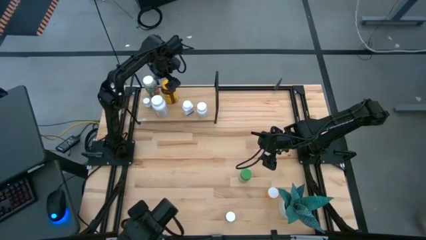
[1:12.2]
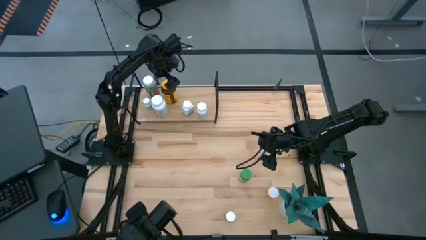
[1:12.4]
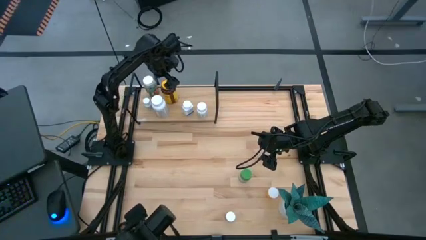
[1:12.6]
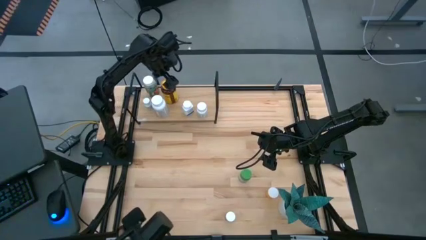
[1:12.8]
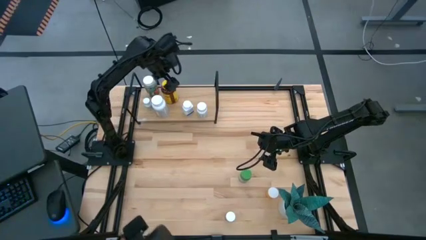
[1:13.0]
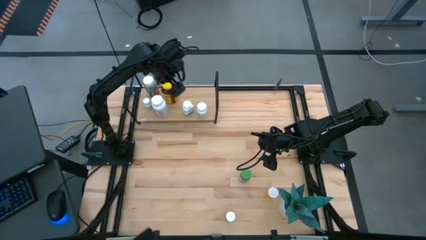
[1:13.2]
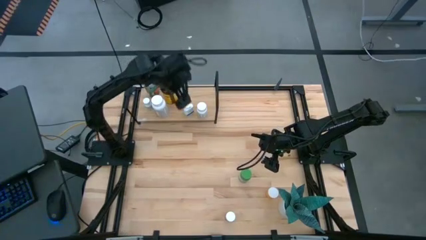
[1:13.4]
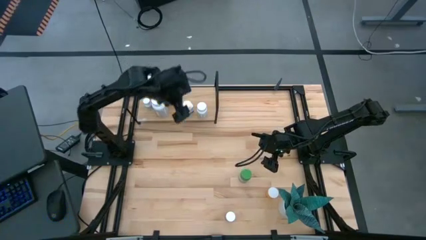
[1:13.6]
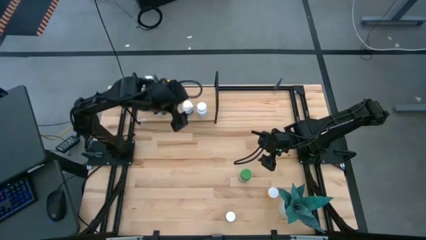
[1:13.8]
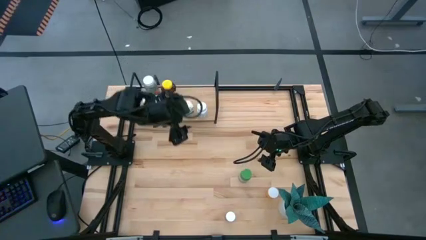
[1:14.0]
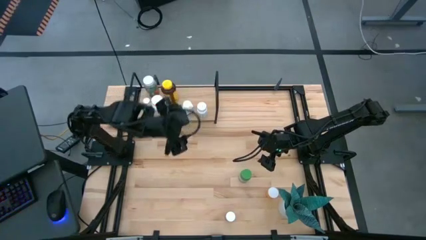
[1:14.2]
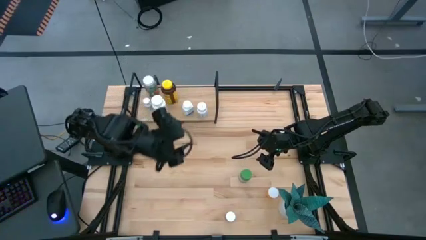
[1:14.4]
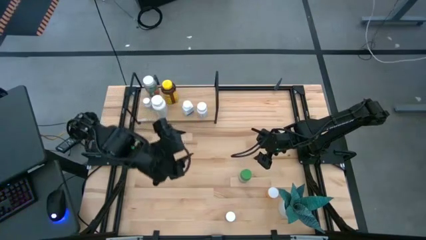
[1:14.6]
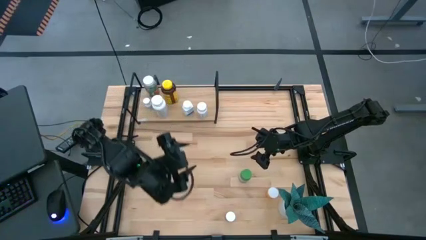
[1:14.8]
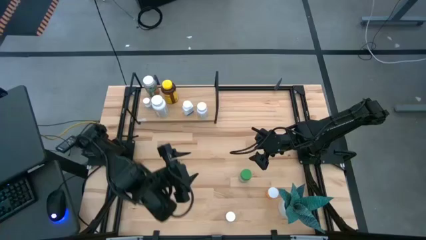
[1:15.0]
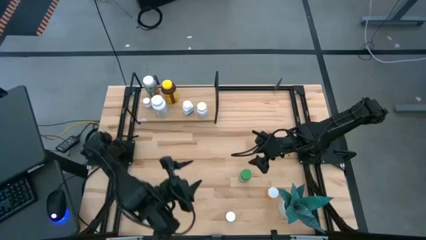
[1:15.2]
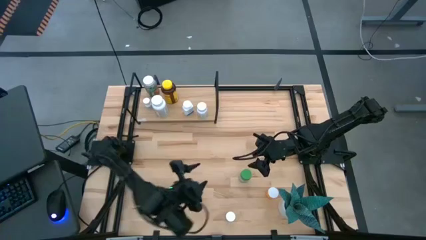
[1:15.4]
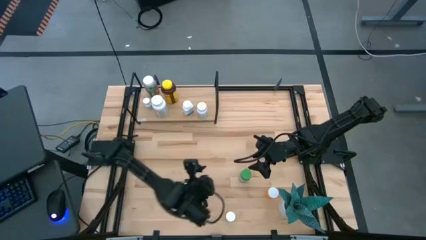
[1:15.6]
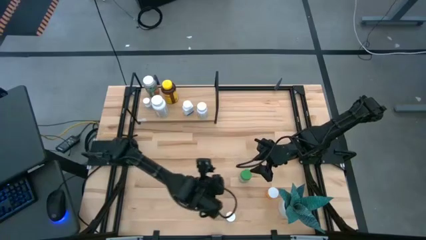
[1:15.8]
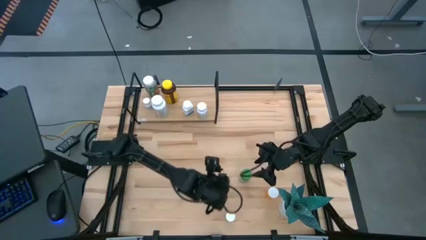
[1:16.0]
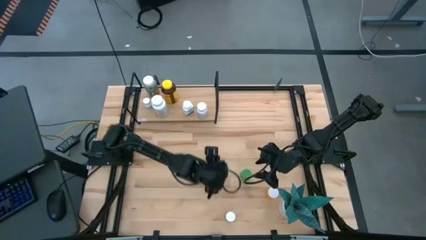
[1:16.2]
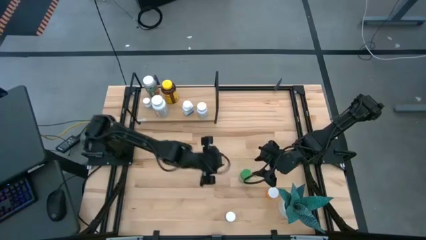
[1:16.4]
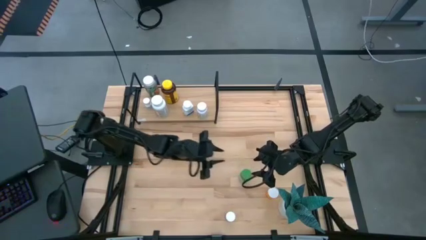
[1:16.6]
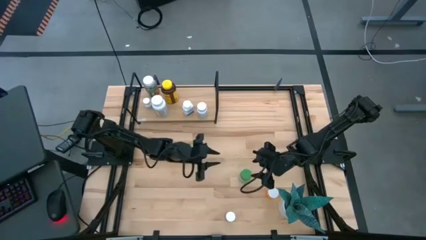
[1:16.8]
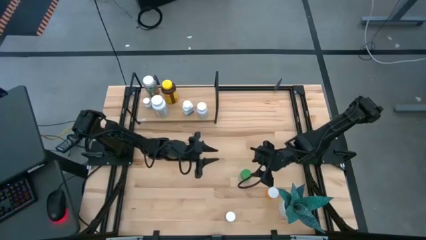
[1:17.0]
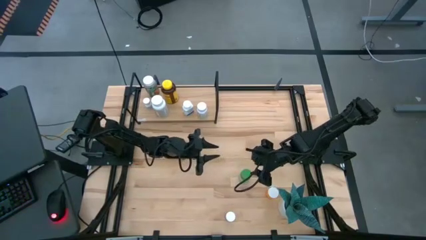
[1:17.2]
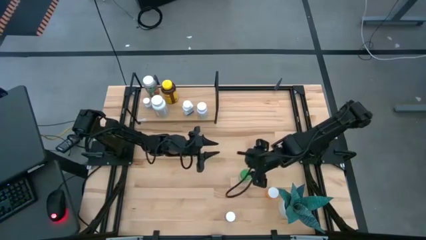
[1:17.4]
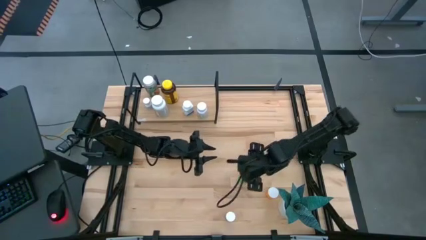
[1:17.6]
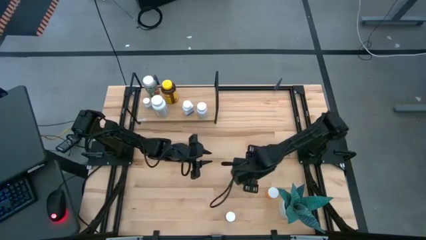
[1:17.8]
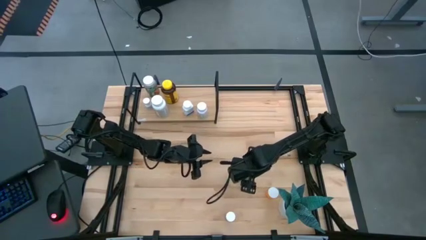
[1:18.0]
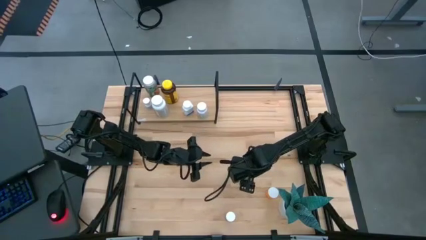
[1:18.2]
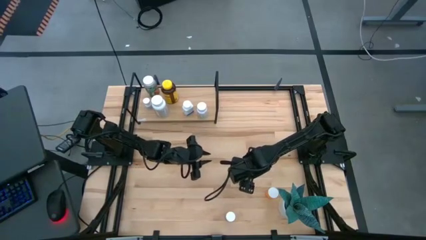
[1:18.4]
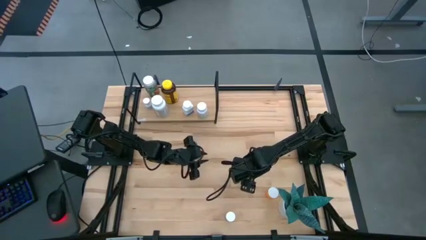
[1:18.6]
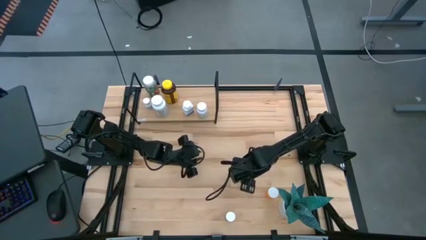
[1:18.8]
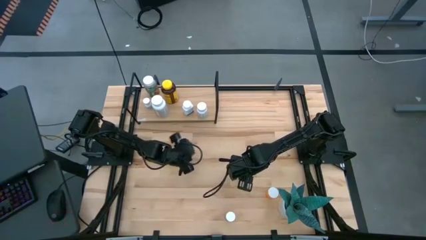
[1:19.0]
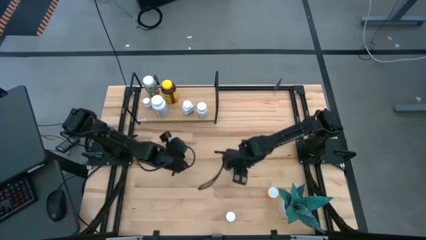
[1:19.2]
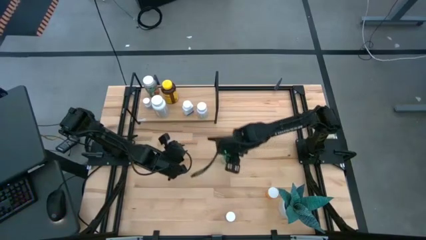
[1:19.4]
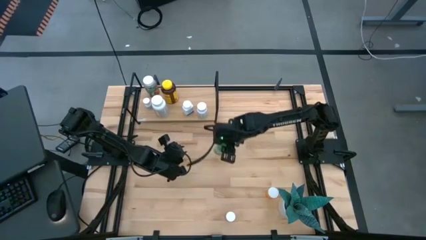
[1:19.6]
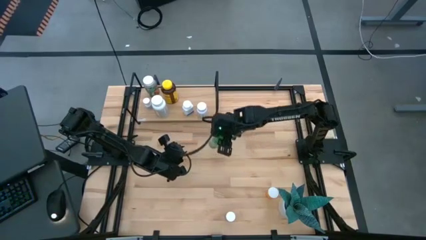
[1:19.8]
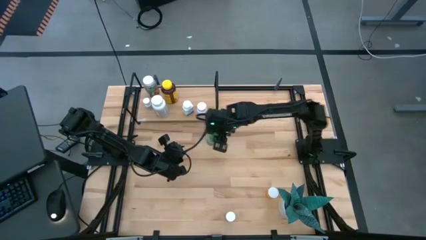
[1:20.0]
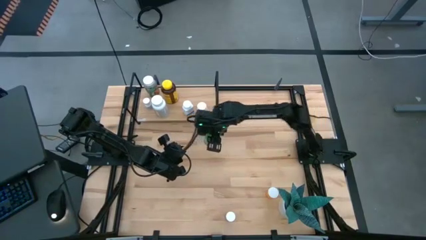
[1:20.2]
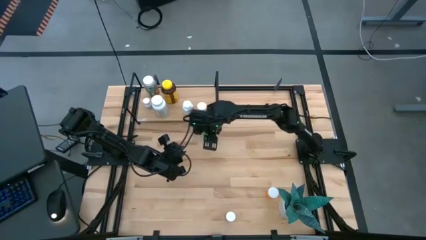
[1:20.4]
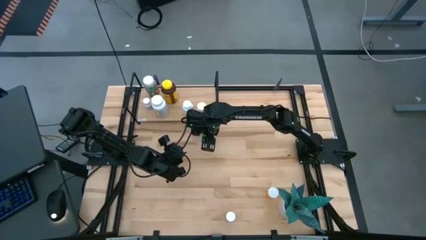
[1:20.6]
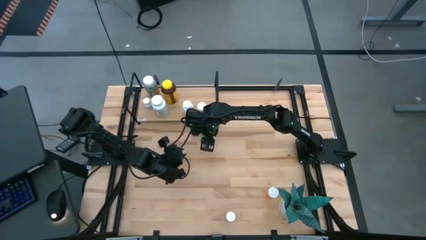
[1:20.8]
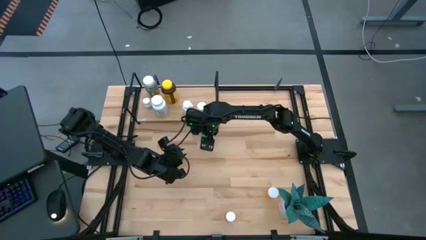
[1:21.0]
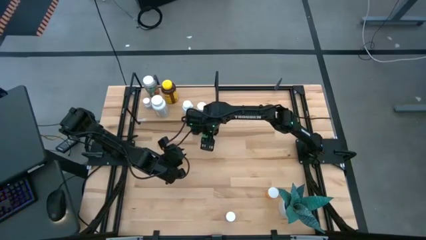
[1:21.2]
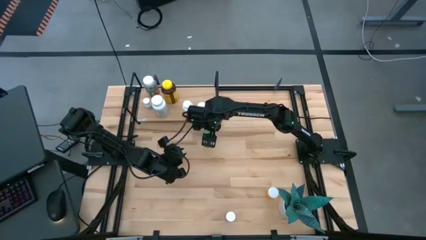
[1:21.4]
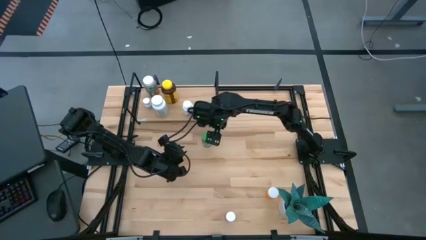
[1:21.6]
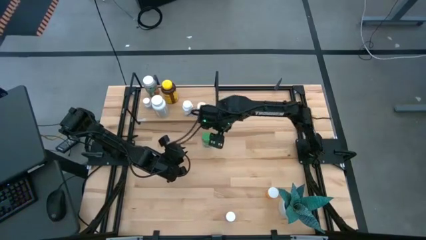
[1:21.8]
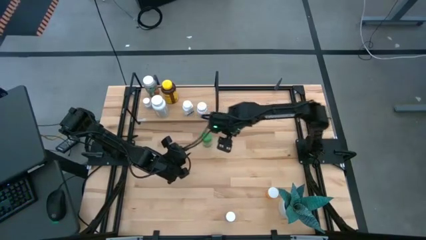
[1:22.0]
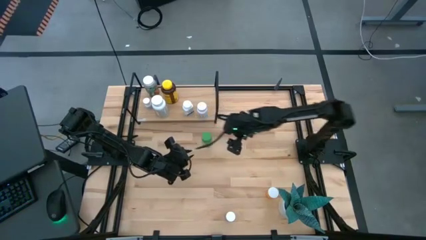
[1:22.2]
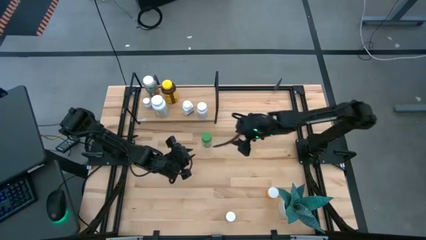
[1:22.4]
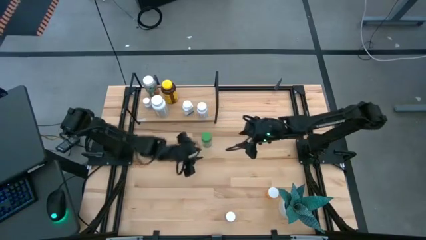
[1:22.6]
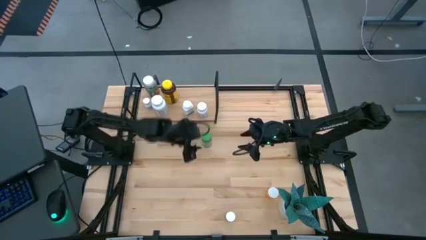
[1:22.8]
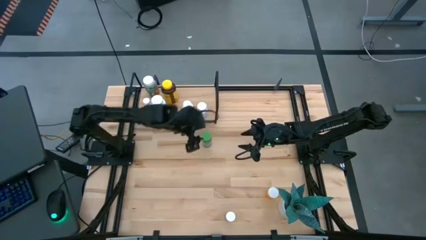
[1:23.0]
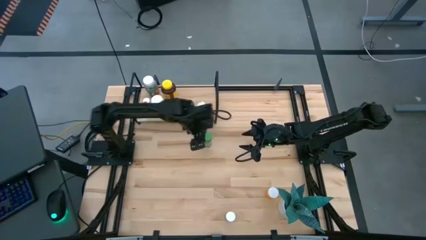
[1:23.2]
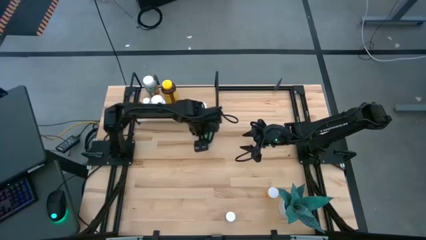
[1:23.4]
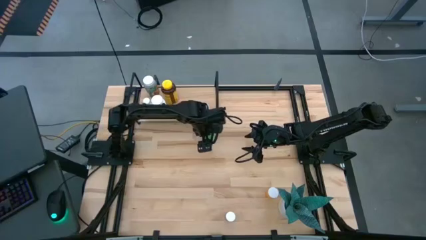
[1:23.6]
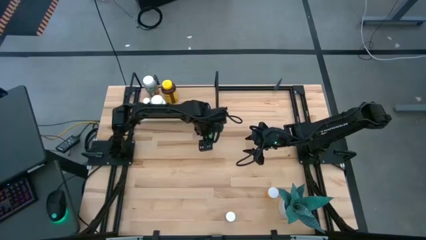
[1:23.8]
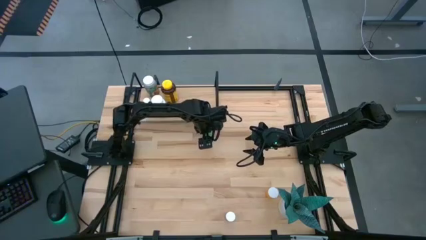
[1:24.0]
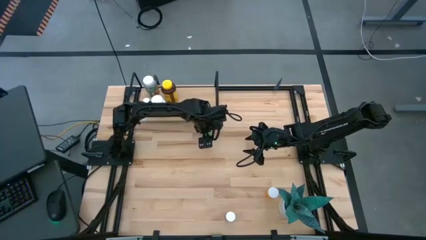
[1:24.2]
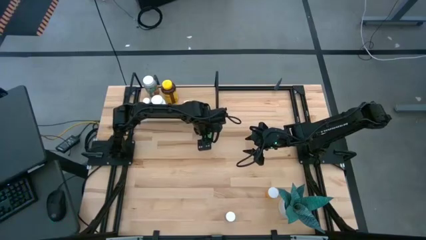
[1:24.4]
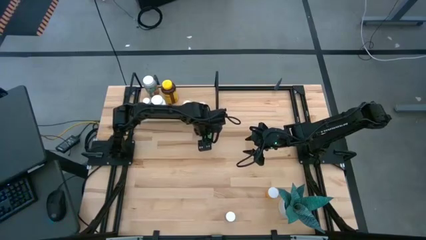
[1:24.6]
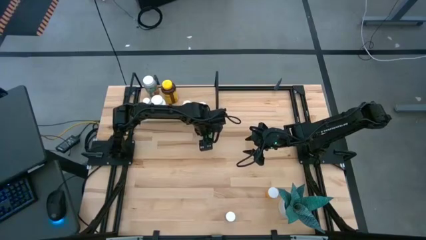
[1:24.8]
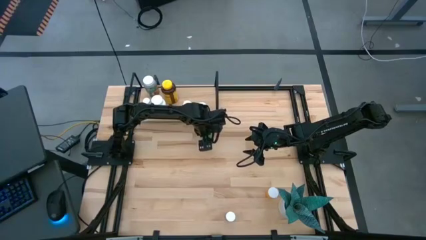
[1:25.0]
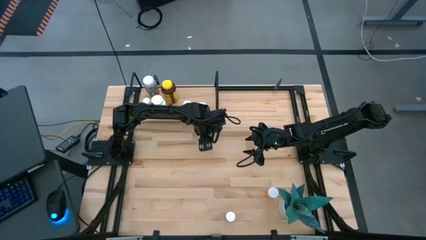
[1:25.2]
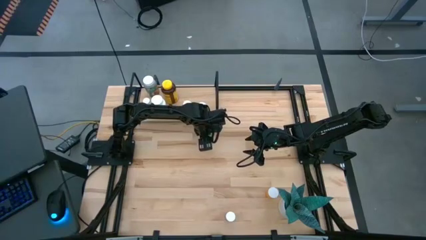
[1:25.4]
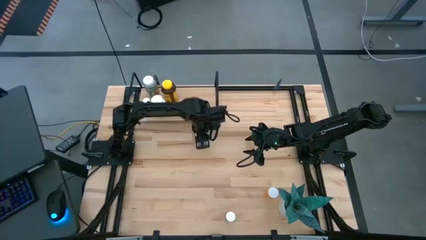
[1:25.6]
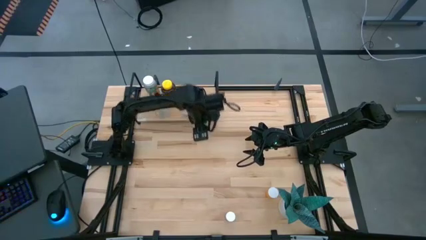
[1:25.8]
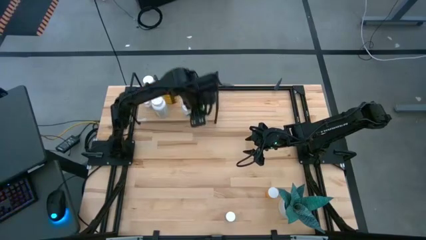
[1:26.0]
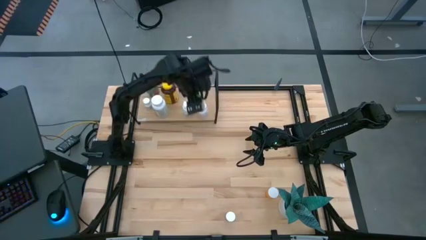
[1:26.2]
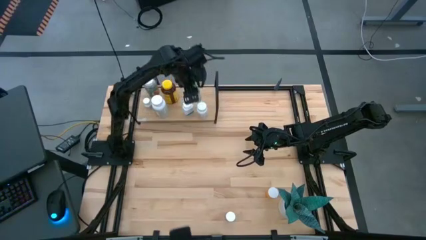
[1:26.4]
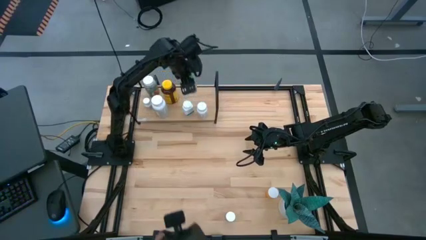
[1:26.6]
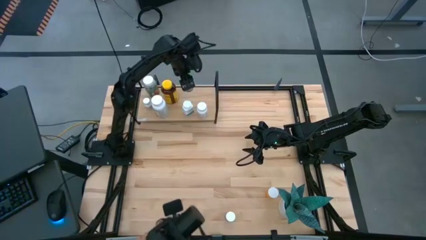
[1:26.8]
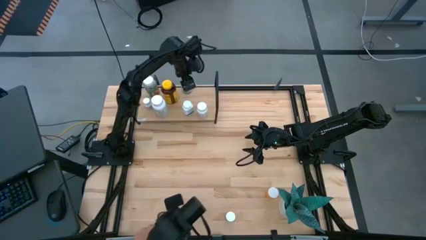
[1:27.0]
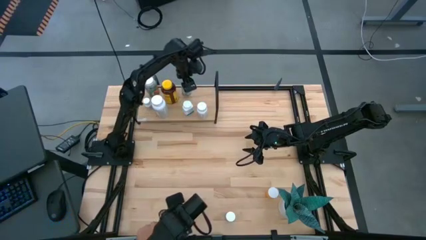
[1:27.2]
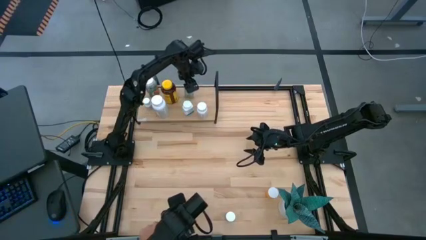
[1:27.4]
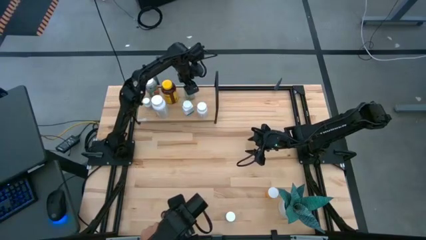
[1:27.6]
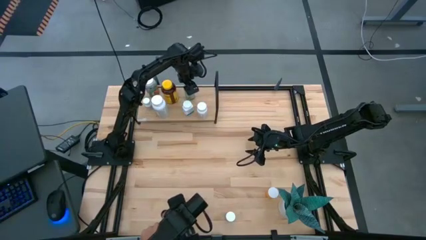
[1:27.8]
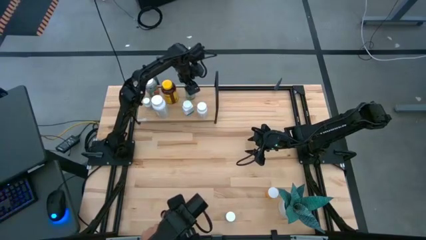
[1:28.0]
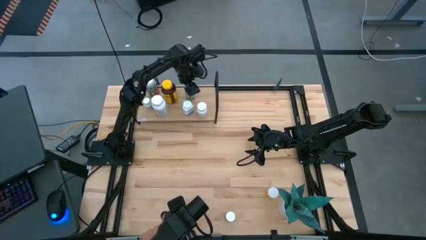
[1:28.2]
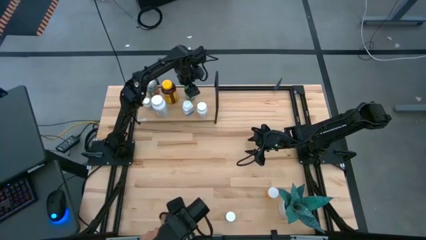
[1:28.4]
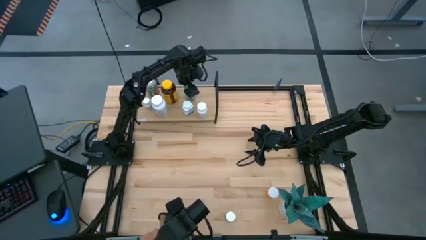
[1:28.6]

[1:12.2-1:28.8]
Task: Pick and place medicine bottles onto shelf by color
Put the green pill bottle on the shelf
